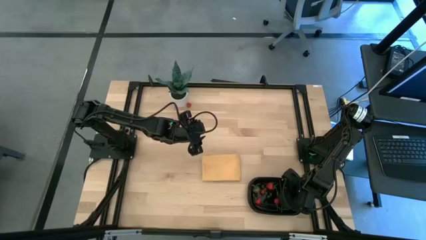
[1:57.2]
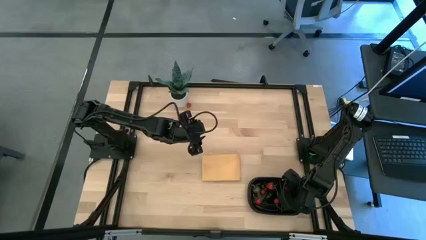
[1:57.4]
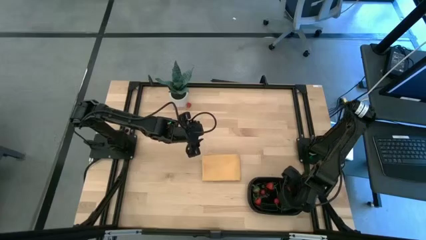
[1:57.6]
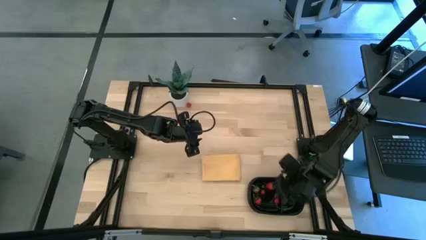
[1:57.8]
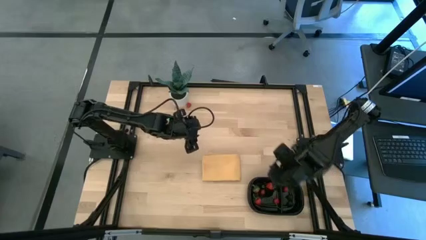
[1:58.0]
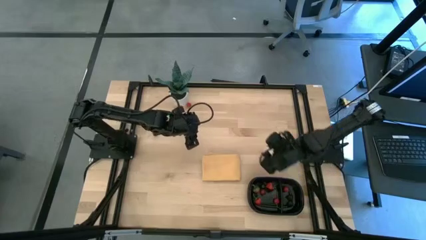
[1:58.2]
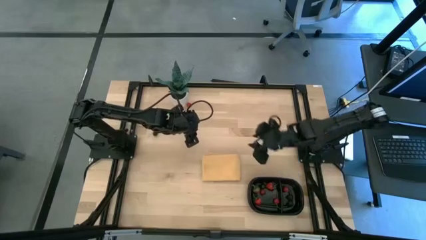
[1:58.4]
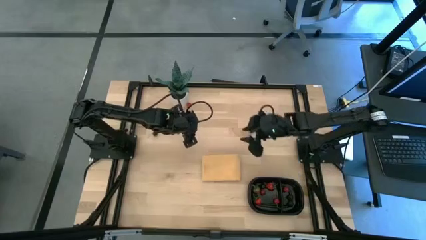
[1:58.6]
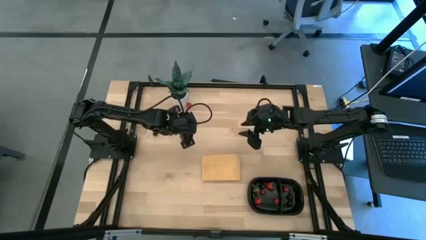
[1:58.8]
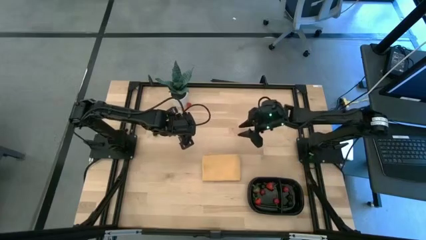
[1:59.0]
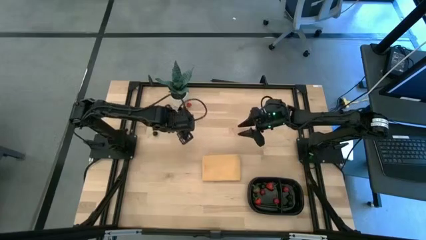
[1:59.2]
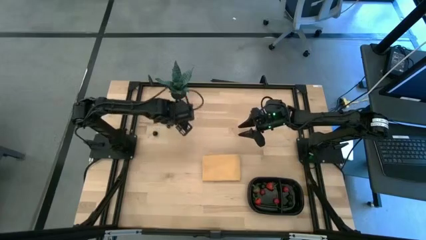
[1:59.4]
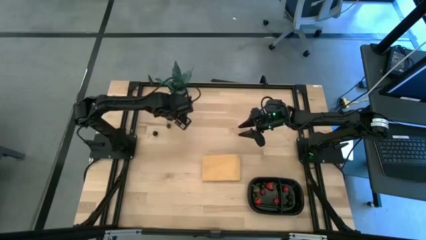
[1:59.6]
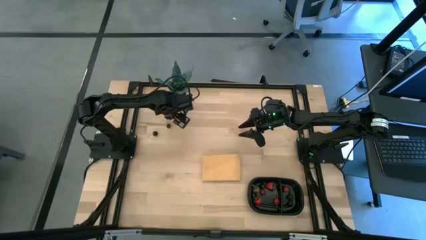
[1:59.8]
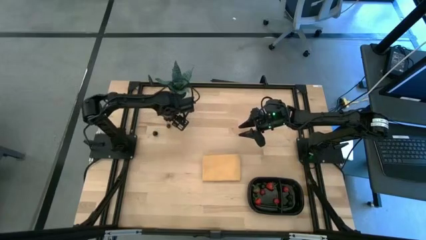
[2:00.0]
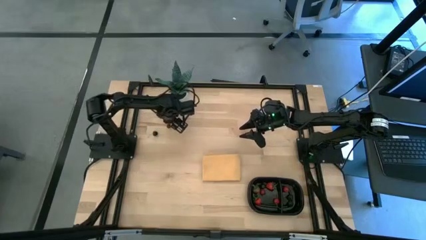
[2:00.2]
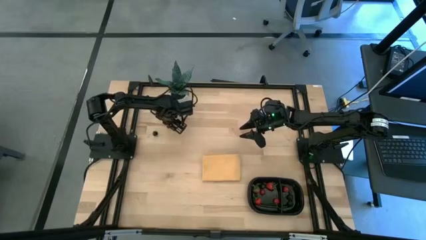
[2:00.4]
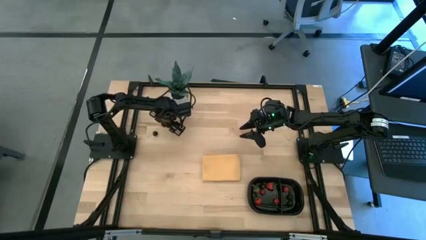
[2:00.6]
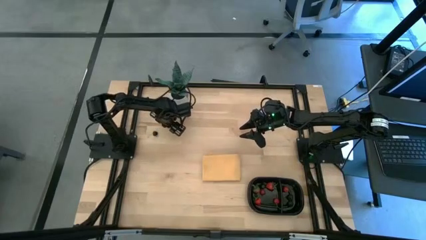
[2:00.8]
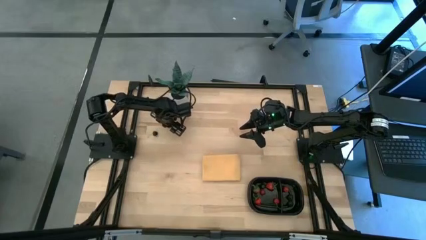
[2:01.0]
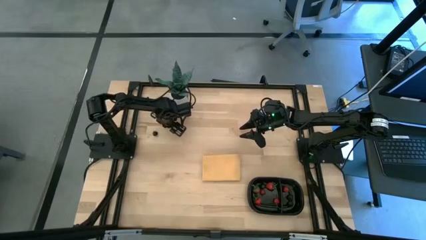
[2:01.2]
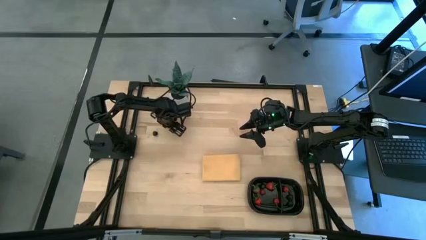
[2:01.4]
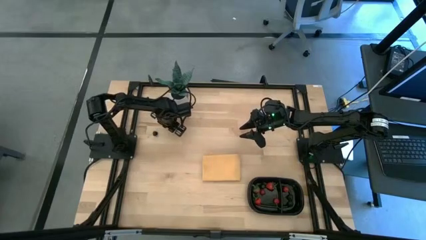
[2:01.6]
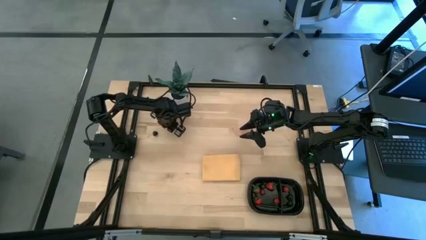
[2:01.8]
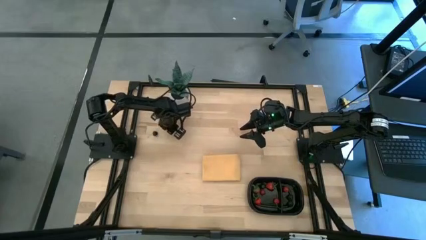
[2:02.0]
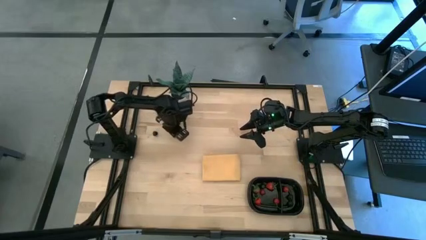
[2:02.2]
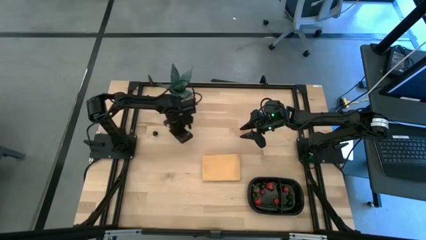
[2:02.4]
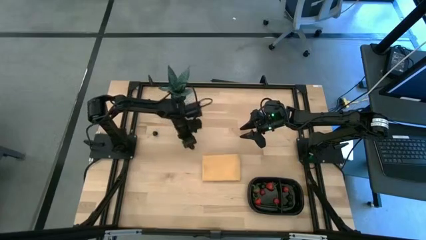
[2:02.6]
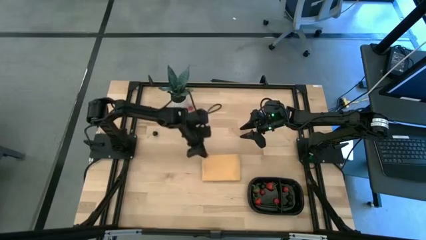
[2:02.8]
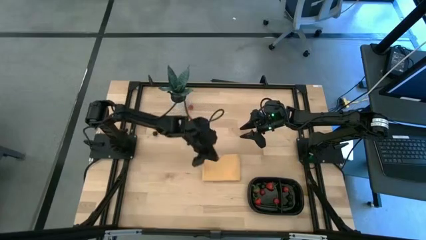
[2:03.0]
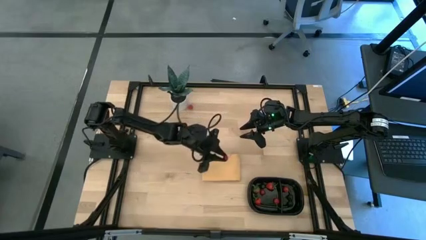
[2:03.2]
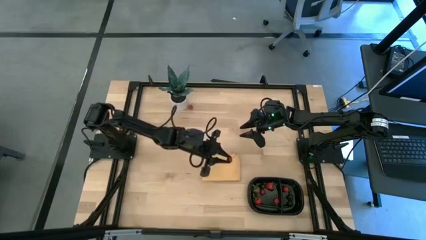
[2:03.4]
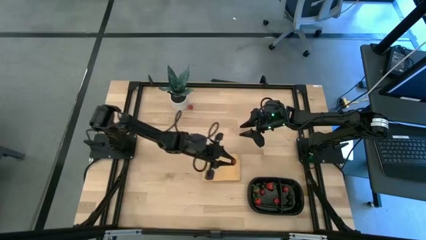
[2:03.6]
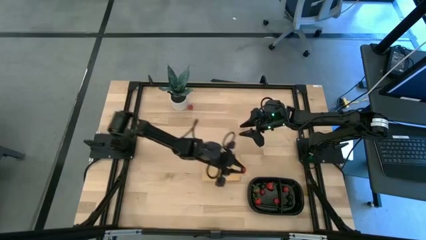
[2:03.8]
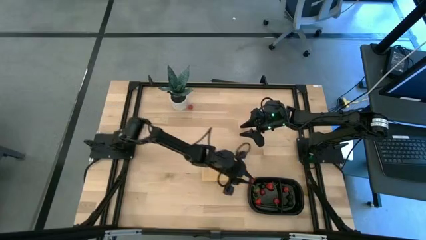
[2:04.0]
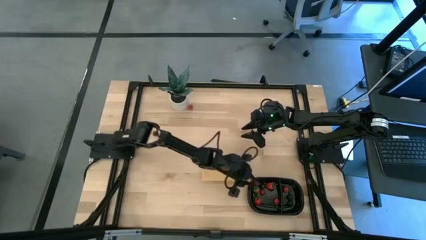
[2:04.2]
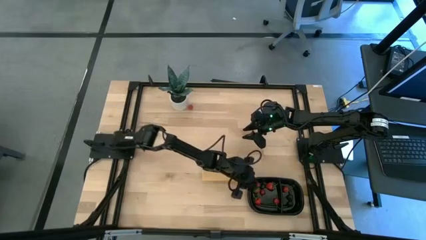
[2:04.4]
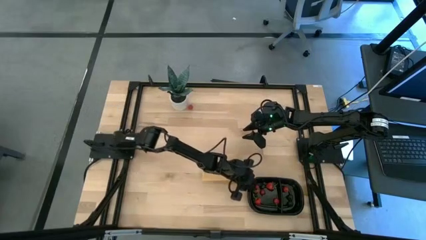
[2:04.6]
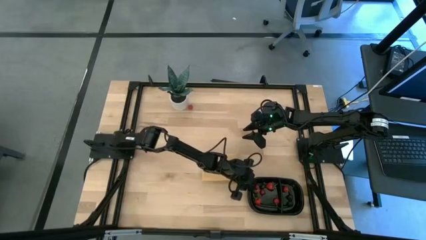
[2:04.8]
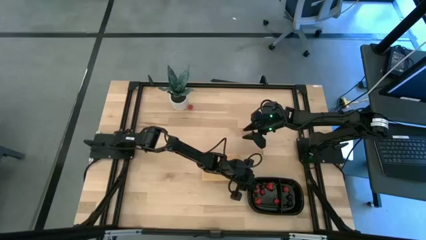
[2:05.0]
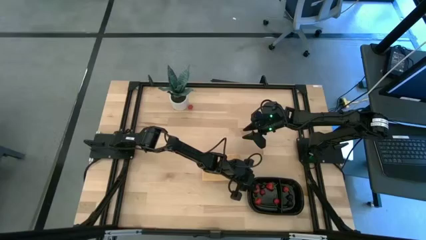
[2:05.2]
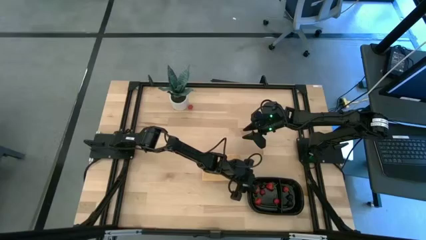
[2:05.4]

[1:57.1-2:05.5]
Task: Pick and placing Produce into tupperware
Put the red cherry into the black container

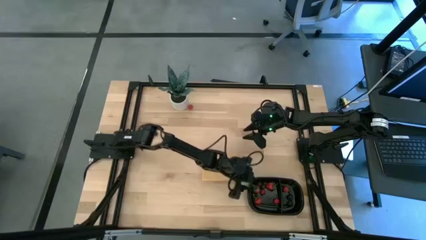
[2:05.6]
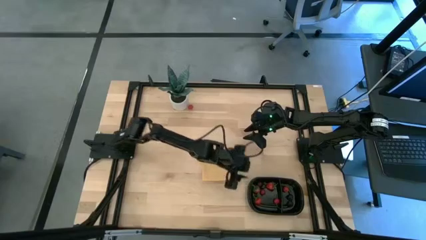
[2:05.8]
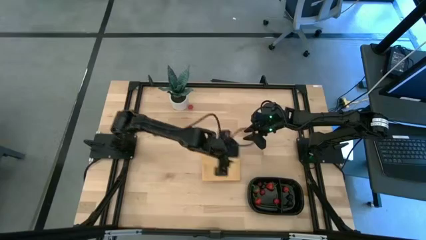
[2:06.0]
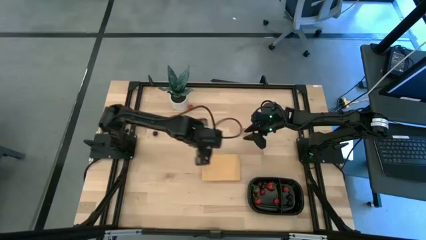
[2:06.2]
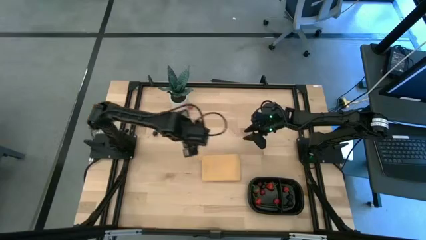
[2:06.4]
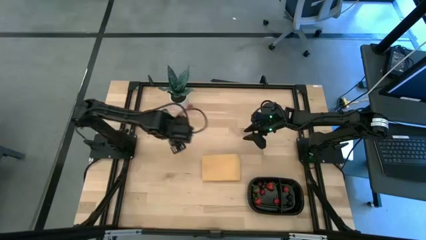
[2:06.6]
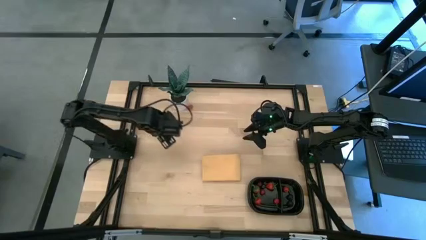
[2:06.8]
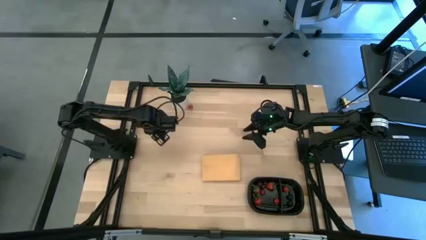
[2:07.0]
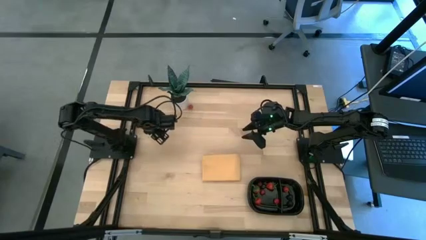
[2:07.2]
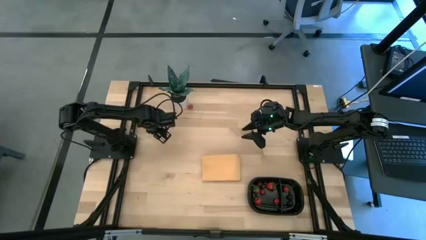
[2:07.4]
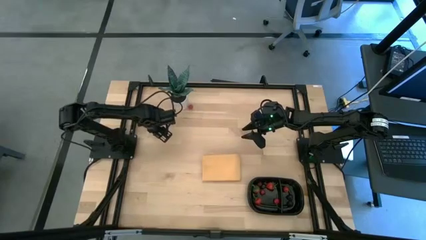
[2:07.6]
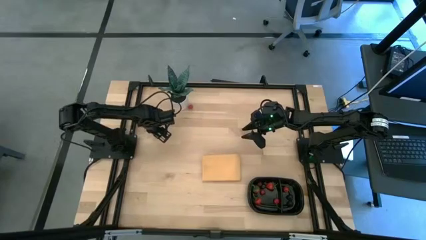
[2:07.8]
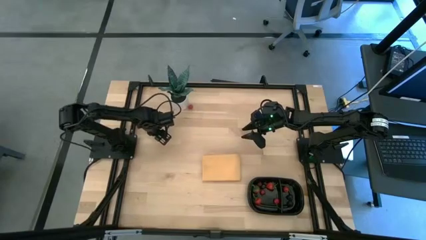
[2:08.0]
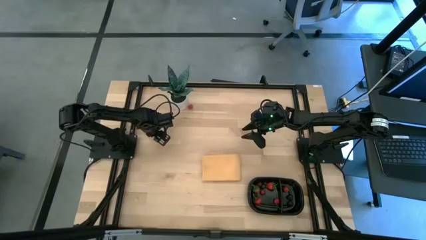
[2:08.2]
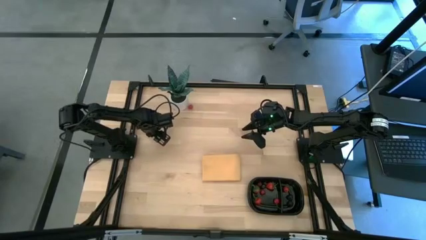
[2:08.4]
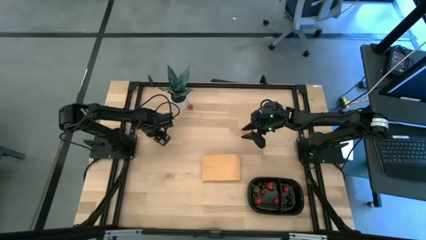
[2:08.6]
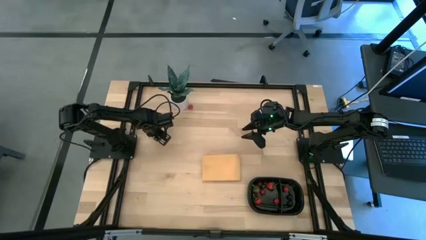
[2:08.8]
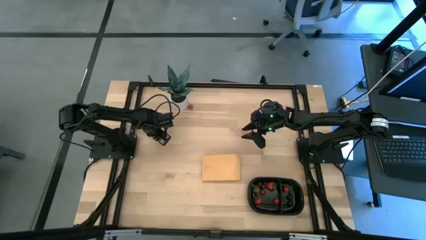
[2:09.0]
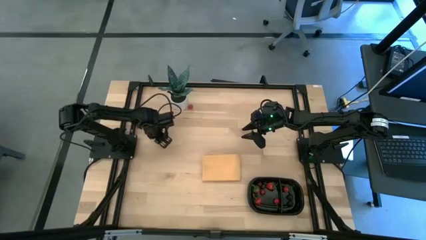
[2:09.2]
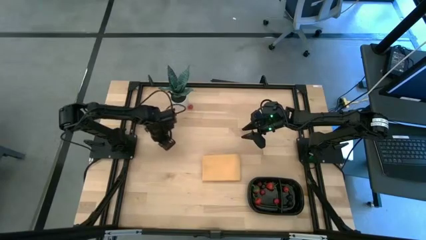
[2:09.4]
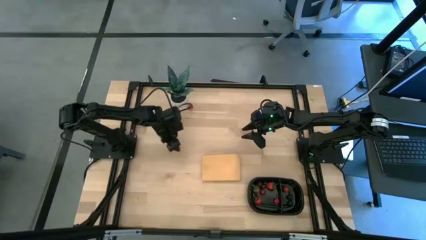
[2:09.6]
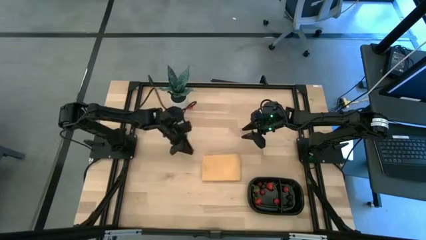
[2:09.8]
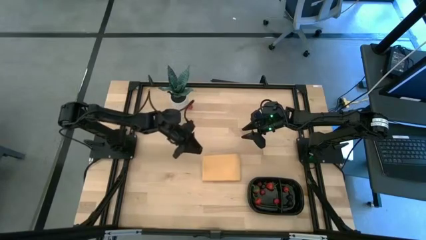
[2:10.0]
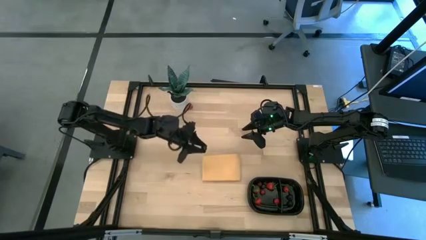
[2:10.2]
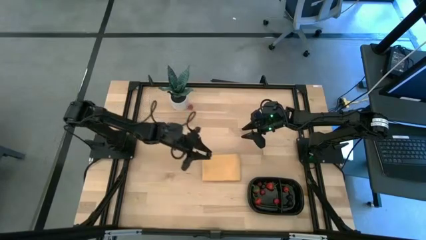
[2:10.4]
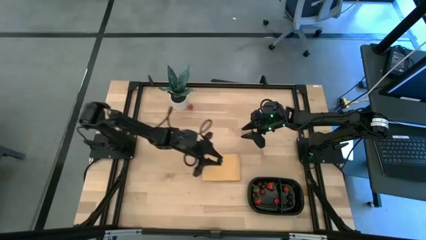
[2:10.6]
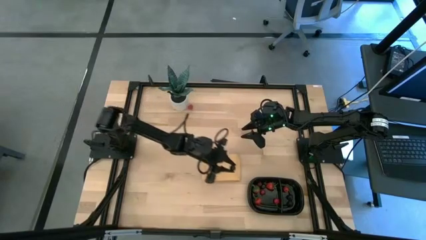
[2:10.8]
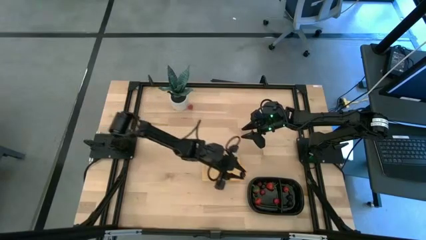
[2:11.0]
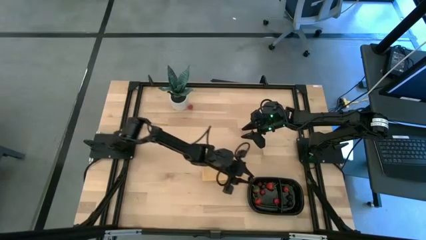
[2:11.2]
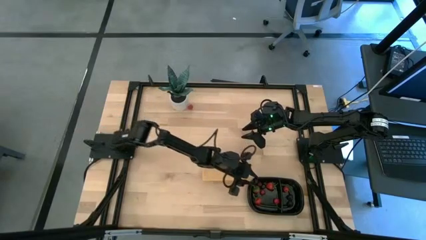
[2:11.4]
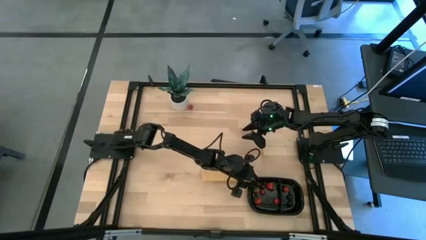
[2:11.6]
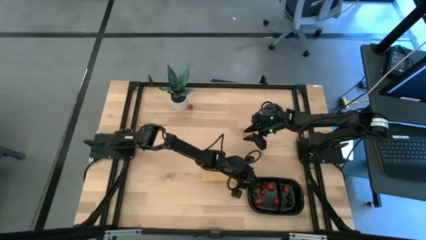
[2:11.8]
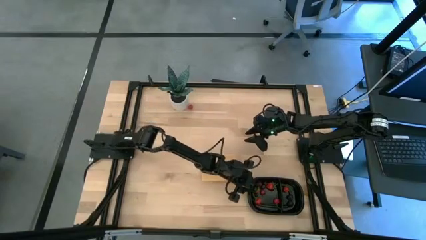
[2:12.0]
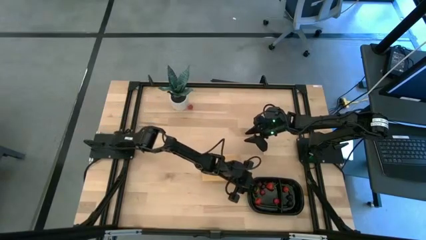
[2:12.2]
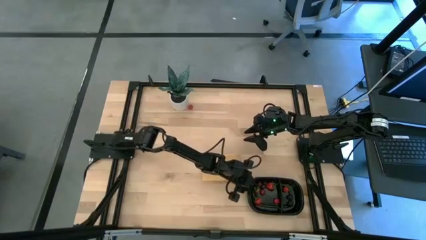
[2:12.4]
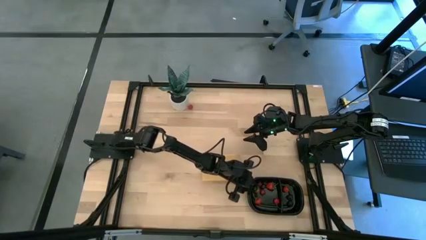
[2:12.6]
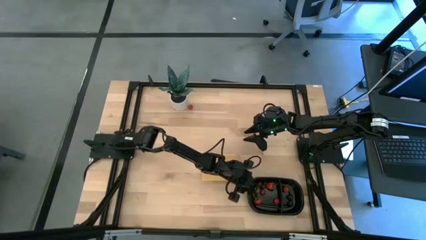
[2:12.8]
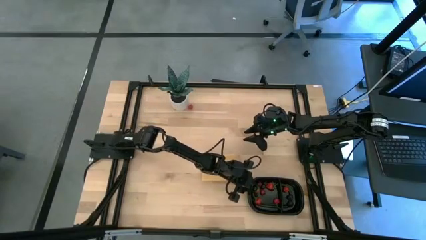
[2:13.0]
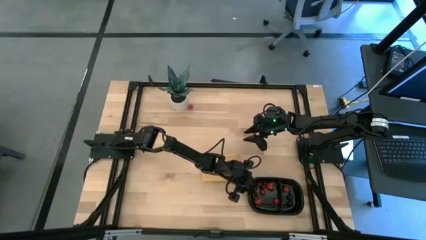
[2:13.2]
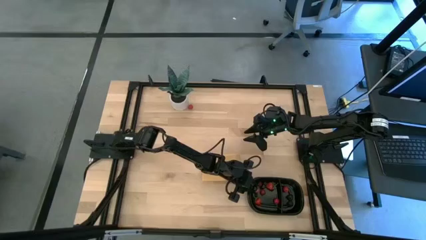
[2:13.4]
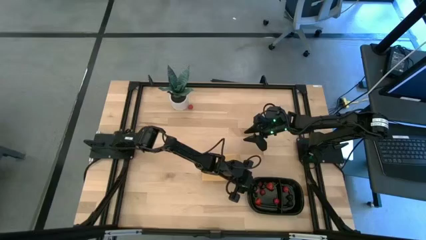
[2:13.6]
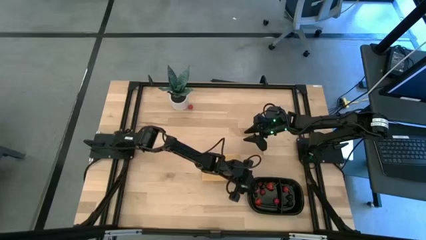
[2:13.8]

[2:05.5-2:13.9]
Put the black cherry into the black container
